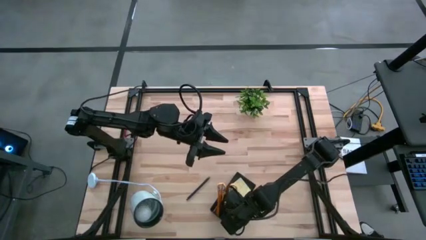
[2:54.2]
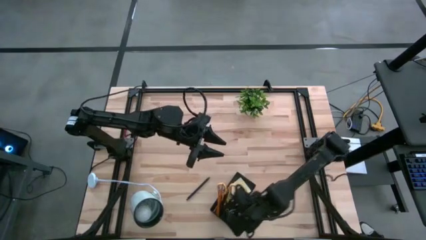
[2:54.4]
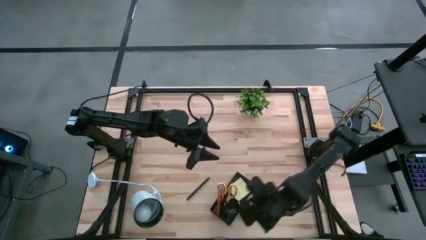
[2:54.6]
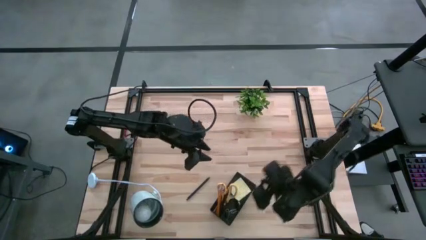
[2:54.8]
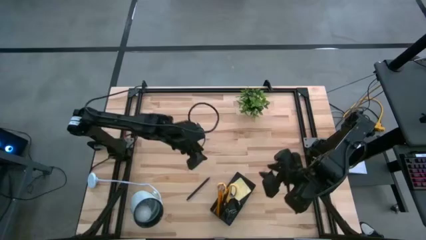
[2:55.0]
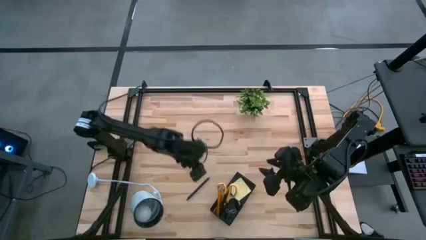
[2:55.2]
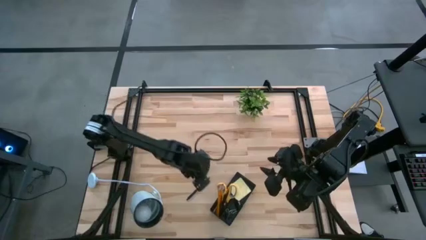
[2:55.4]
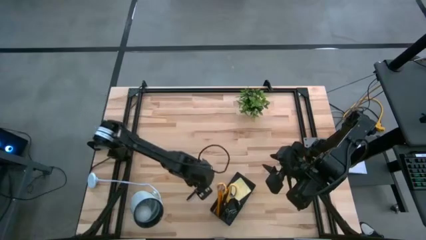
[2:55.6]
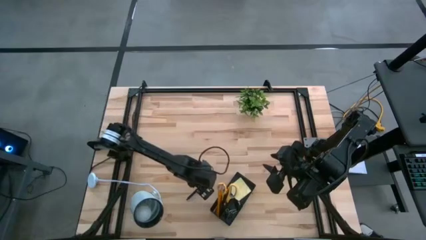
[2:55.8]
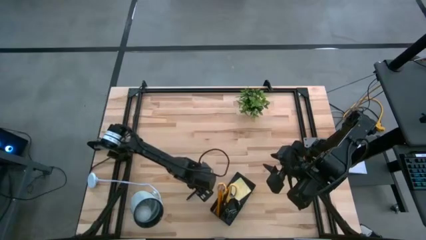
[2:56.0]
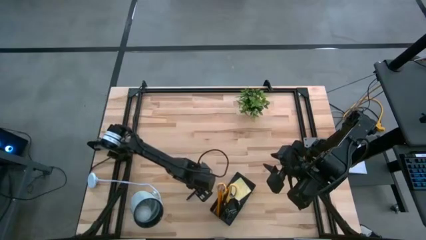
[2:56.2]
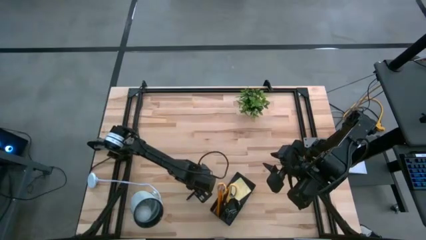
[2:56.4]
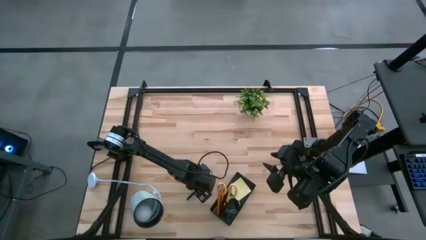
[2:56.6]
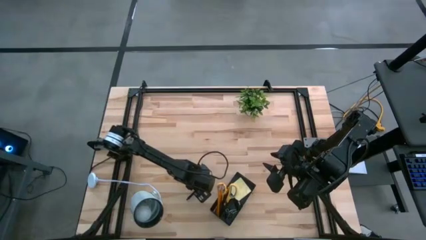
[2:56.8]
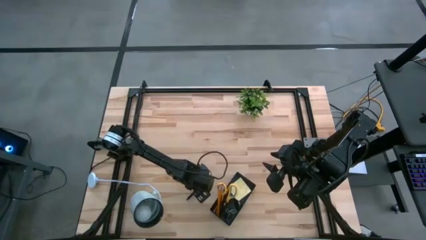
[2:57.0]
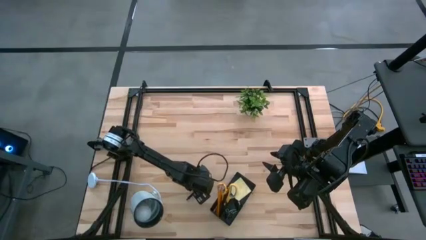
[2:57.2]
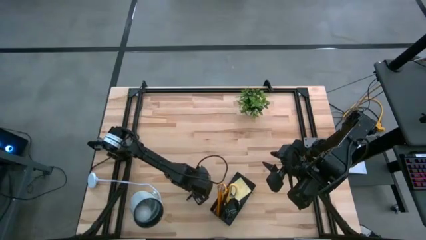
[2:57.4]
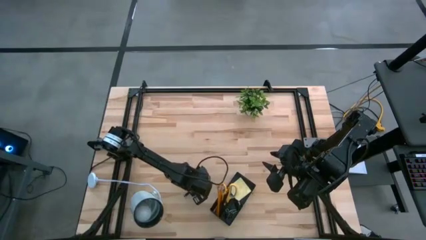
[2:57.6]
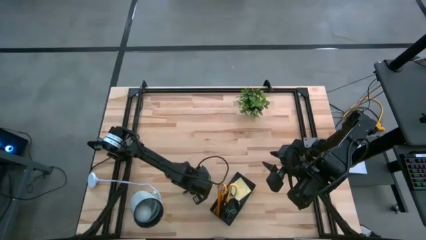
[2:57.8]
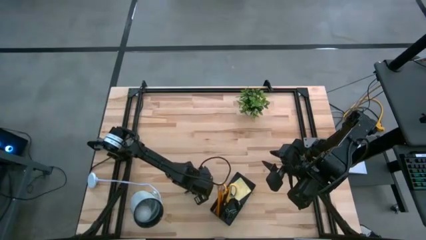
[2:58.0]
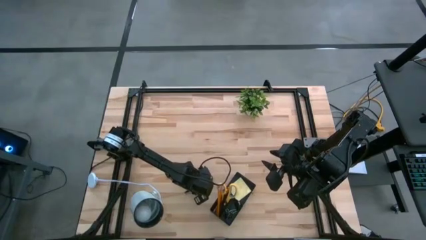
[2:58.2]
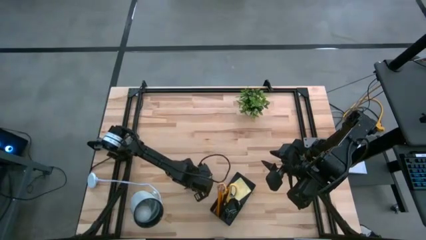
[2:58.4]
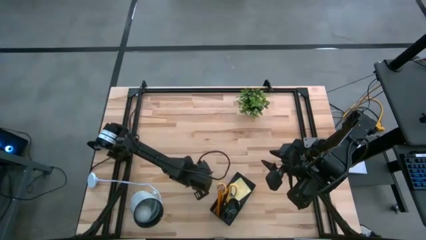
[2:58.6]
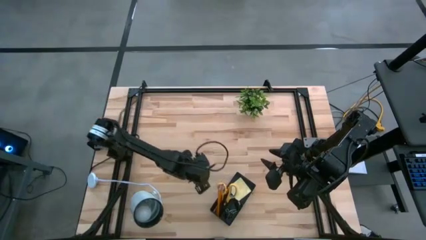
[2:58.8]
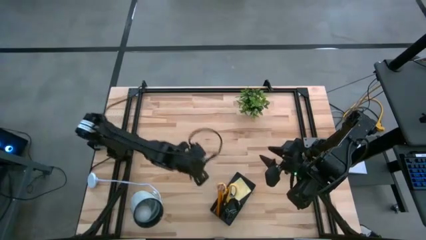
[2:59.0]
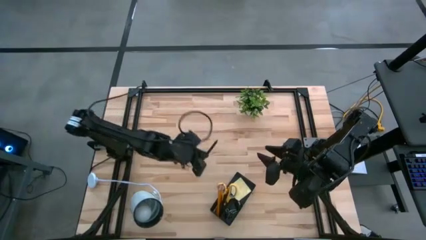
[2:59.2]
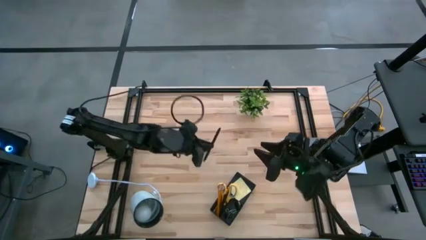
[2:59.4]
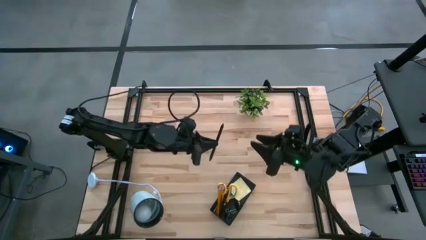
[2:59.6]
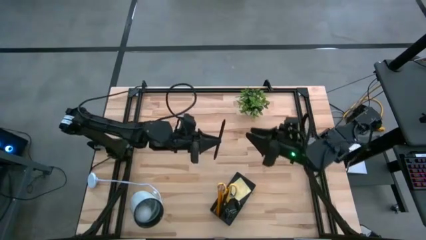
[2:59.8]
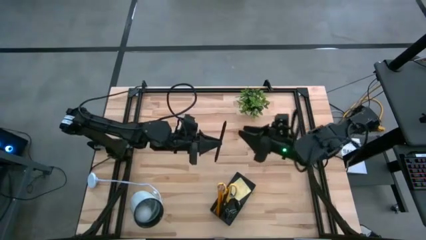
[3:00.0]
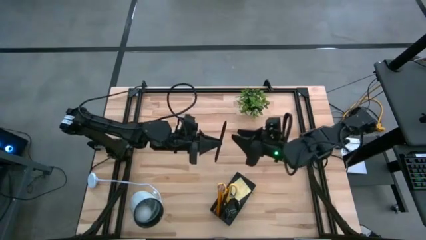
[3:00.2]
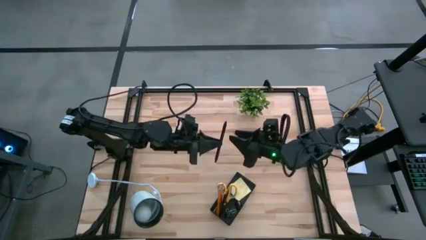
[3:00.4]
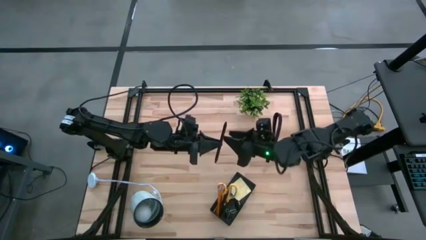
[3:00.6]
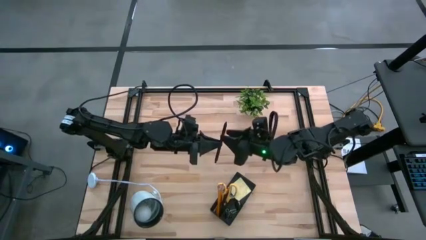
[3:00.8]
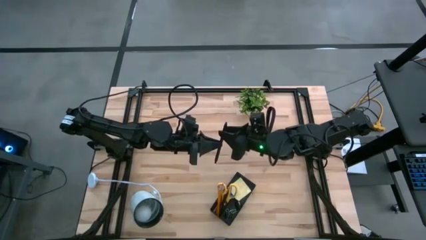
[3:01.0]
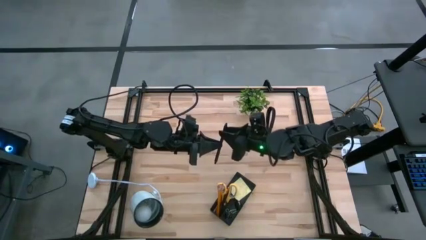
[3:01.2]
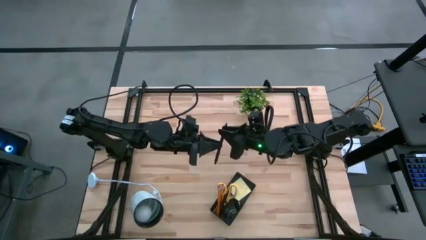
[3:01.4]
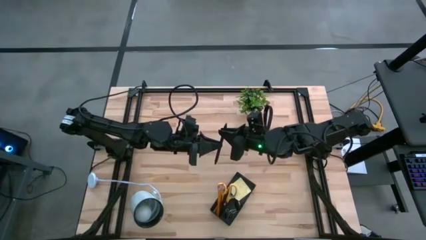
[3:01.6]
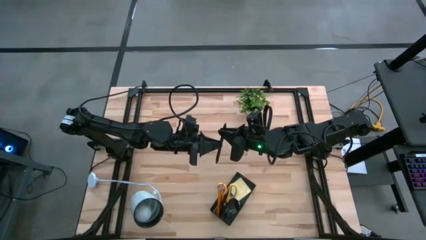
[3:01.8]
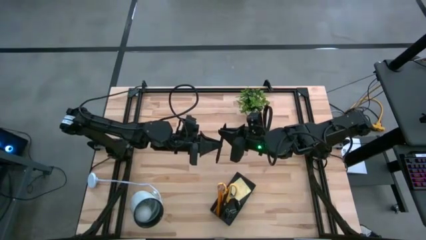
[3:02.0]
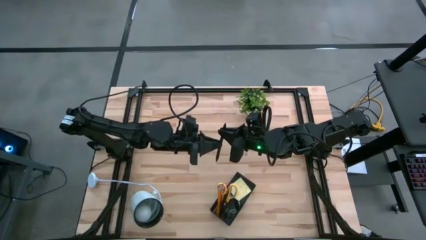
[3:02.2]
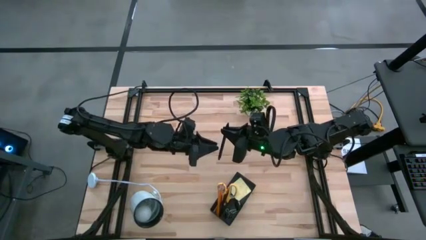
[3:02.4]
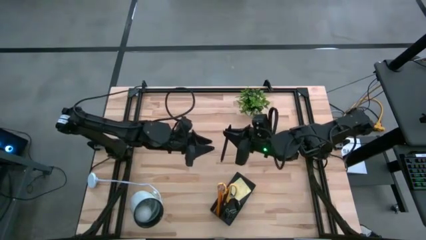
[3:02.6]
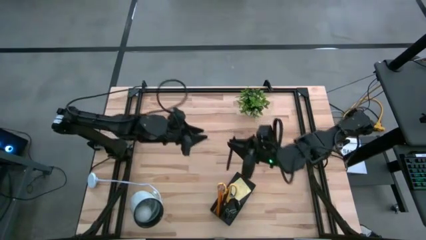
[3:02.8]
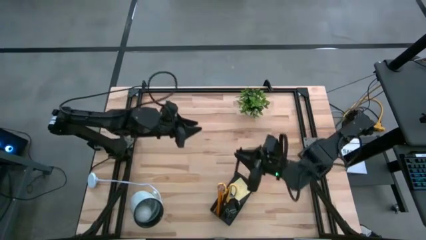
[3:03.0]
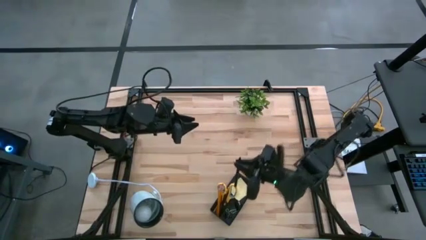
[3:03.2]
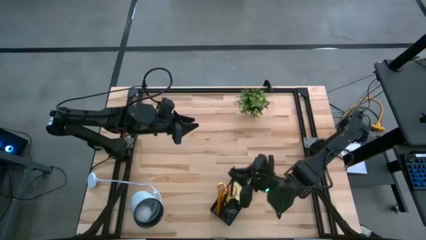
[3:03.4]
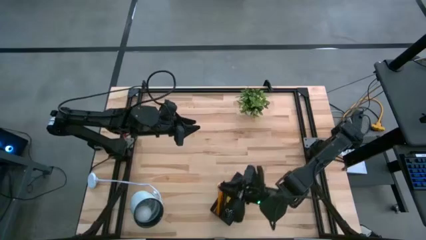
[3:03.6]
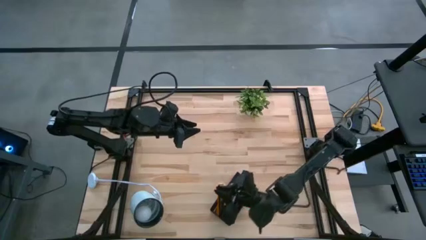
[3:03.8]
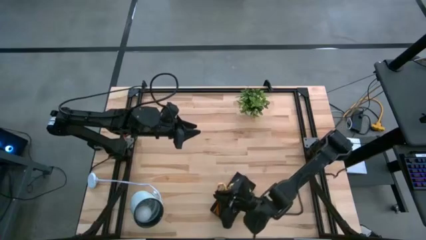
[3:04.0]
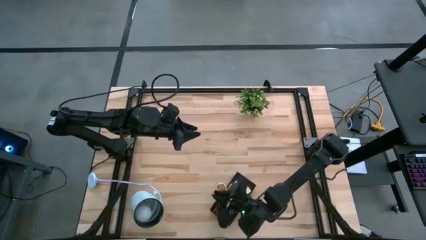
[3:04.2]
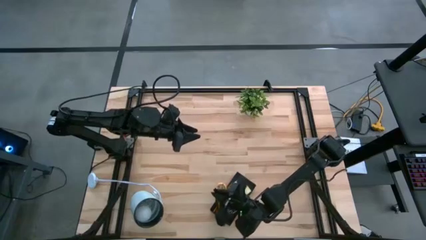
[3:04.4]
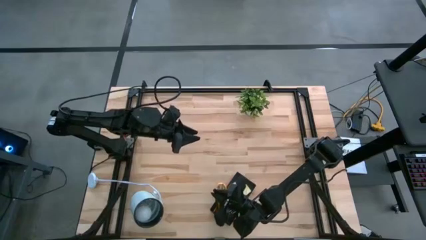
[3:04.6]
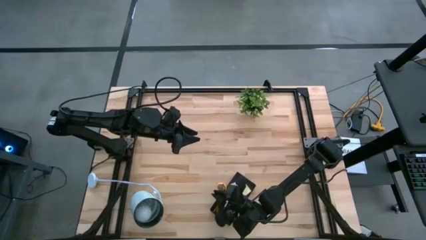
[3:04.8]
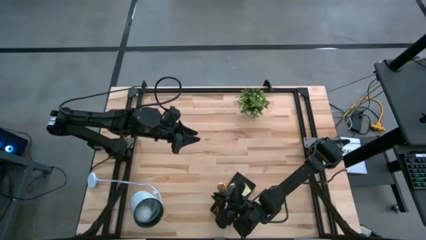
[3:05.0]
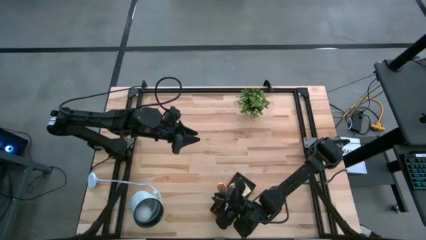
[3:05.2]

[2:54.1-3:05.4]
Task: Pick and place office supplies into organizer
Put the pen into the desk organizer

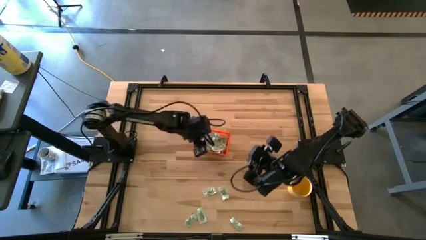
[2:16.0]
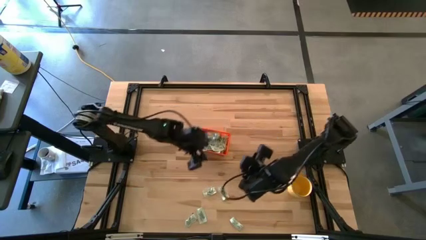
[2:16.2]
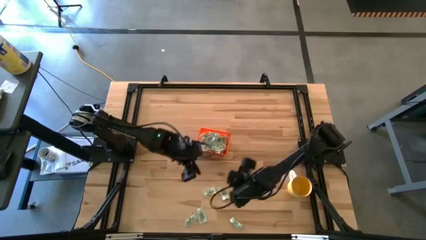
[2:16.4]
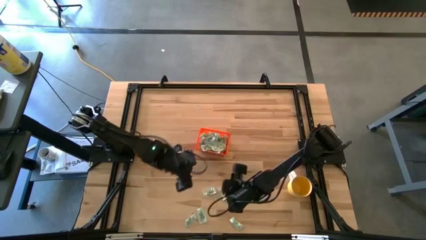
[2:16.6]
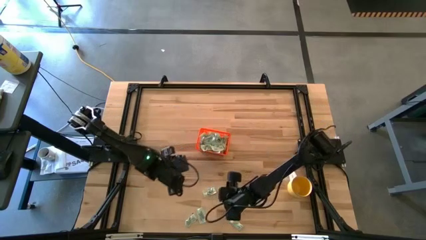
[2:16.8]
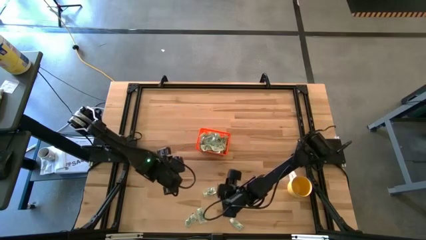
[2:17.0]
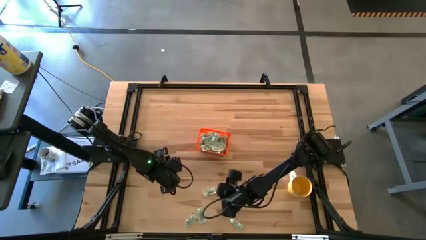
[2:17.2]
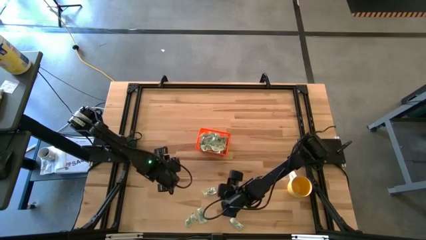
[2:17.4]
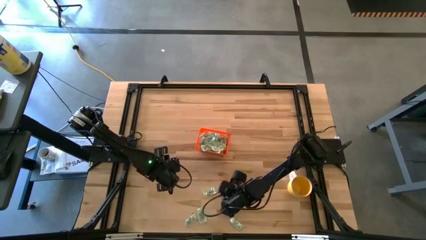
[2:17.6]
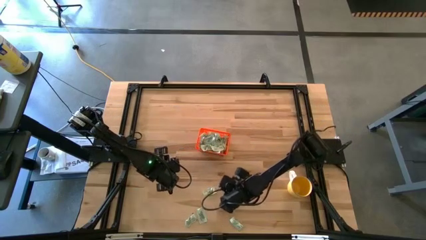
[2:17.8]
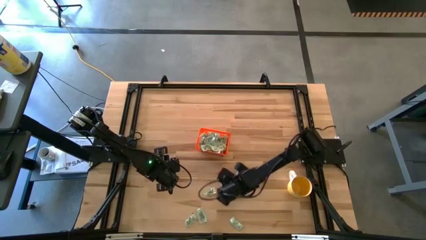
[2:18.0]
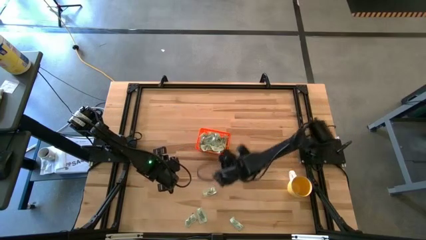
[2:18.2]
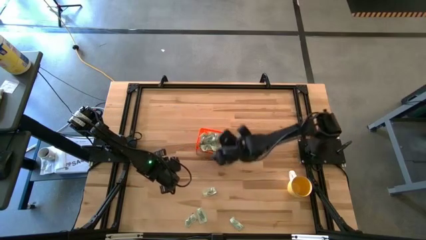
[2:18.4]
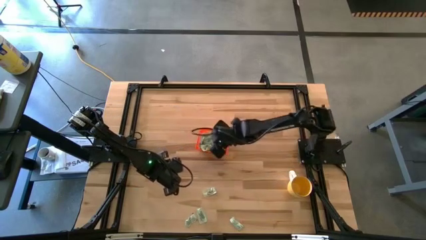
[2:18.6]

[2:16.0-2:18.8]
Task: Pick and place Stevia / Truvia into bins
Put the light green stevia packet into the orange bin

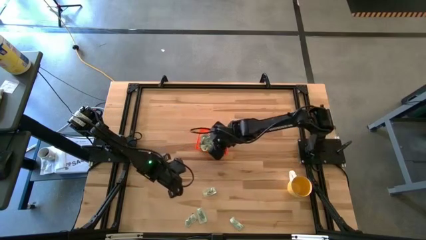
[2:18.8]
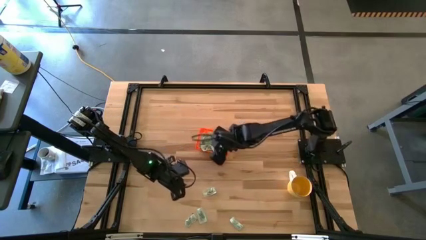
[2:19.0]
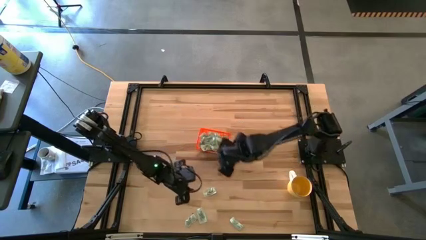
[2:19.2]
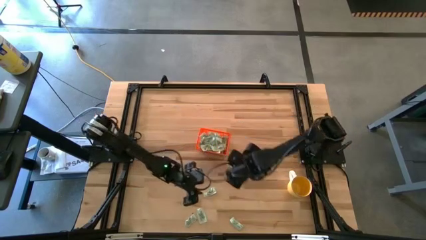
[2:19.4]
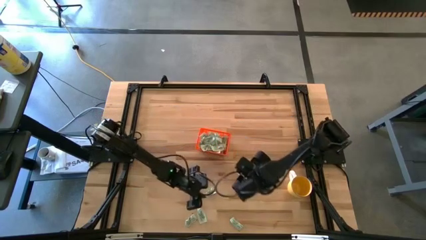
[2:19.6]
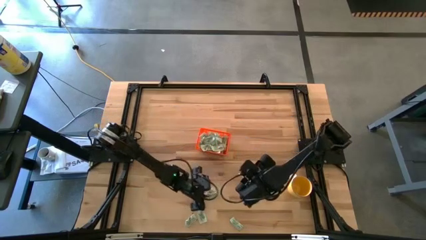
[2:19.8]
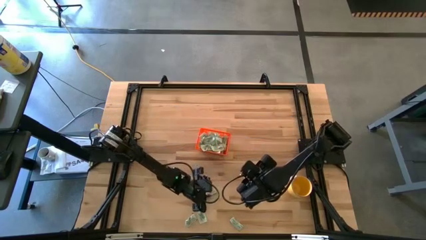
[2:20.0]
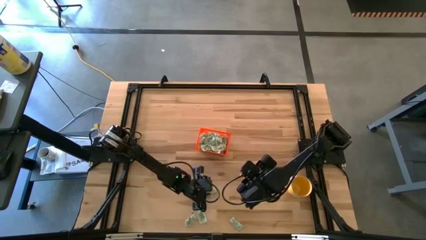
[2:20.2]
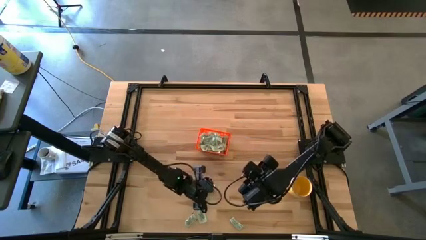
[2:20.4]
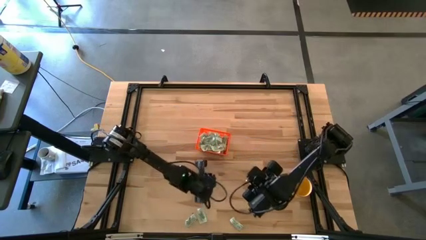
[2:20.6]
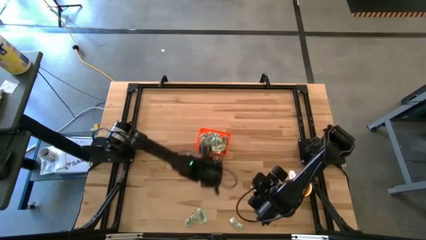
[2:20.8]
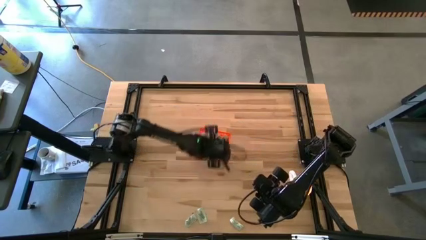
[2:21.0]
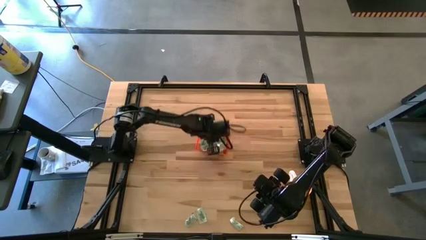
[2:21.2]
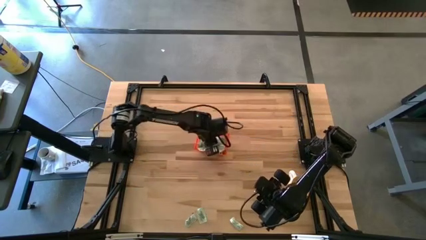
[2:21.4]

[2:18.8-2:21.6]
Put the light green stevia packet into the orange bin

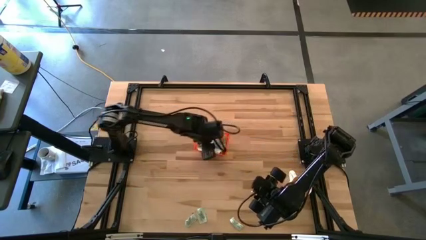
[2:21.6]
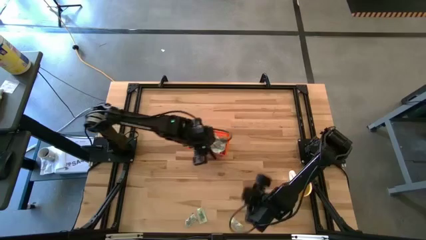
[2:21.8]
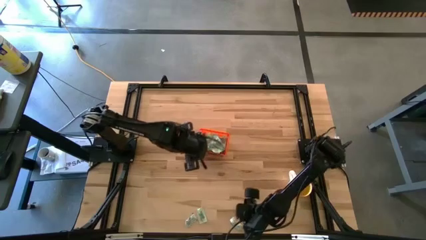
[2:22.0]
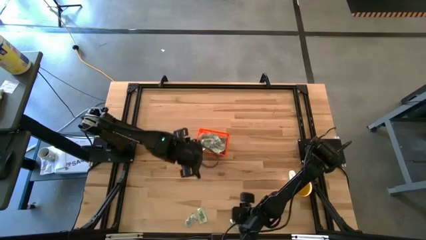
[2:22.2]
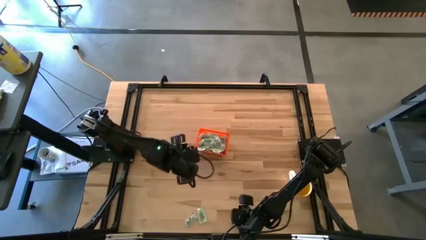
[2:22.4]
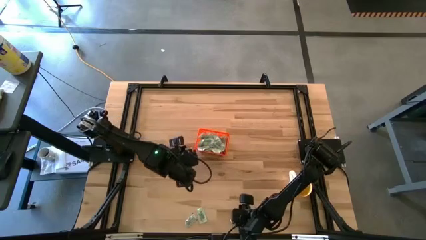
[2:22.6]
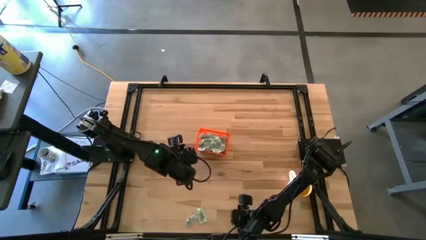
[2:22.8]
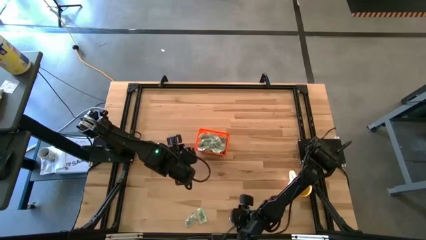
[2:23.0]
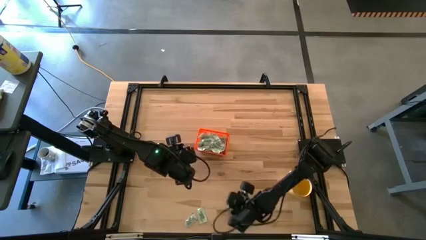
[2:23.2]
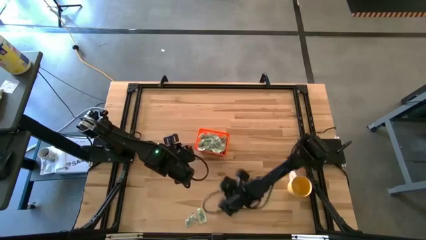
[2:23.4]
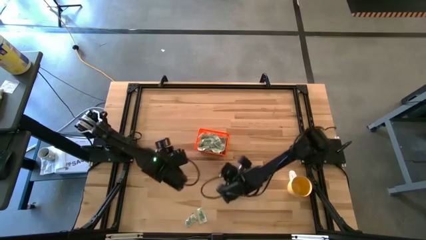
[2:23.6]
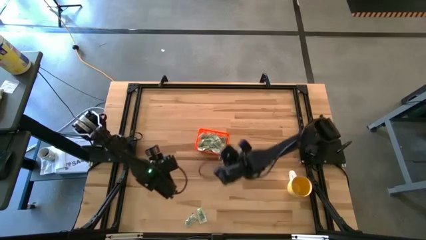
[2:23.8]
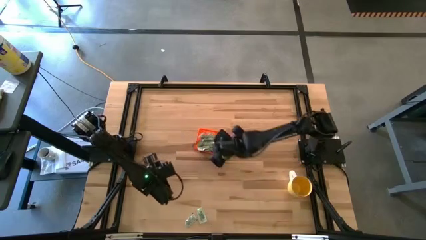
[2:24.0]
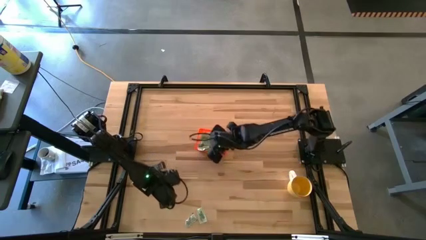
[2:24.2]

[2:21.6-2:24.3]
Put the right light green stevia packet into the orange bin
